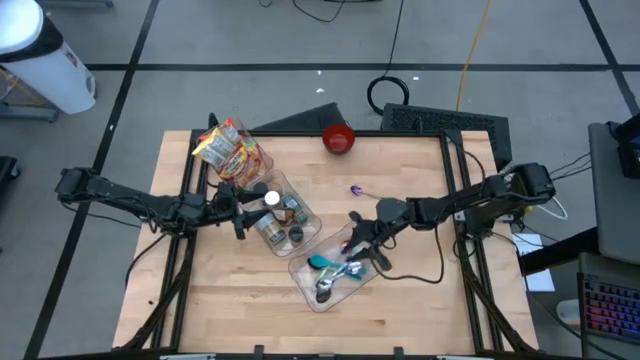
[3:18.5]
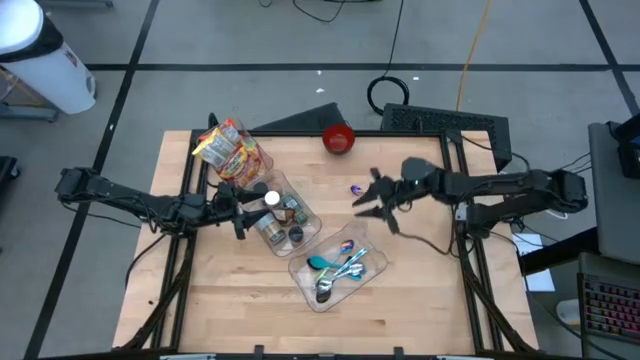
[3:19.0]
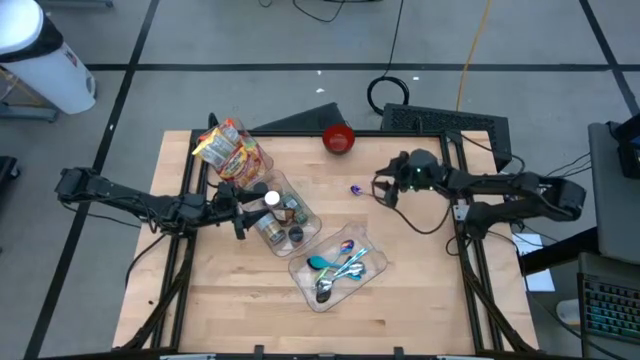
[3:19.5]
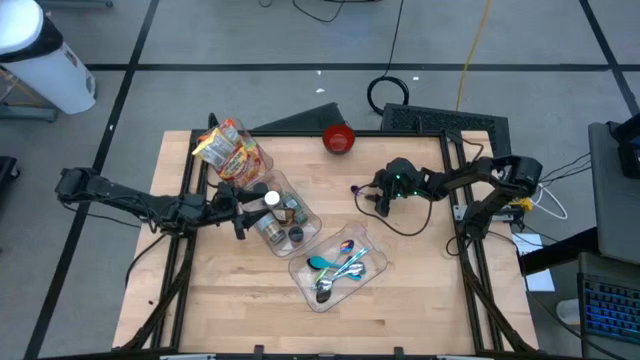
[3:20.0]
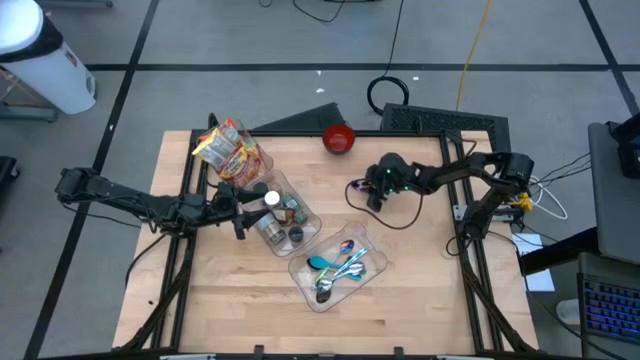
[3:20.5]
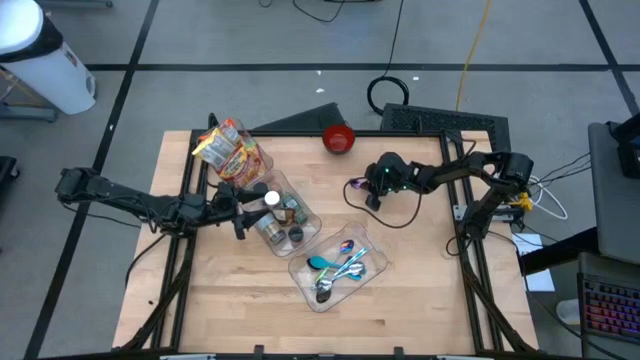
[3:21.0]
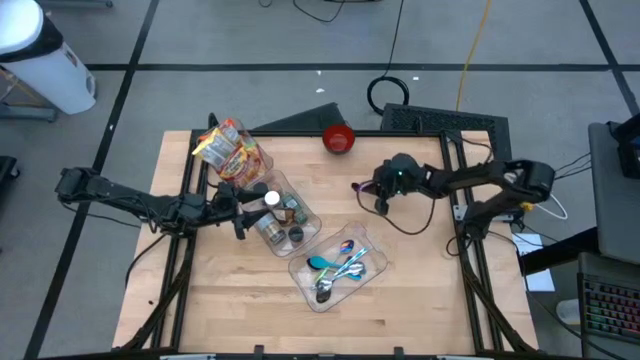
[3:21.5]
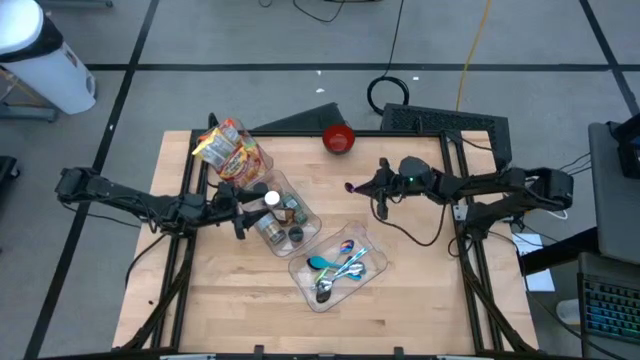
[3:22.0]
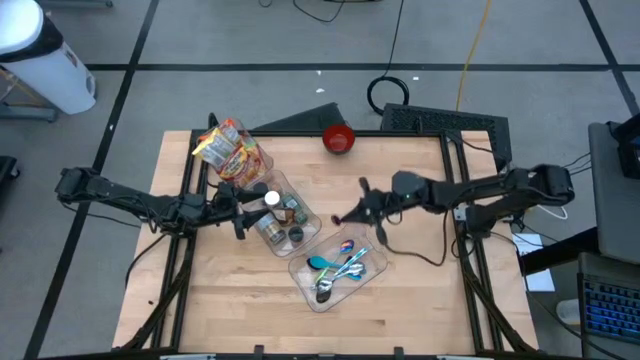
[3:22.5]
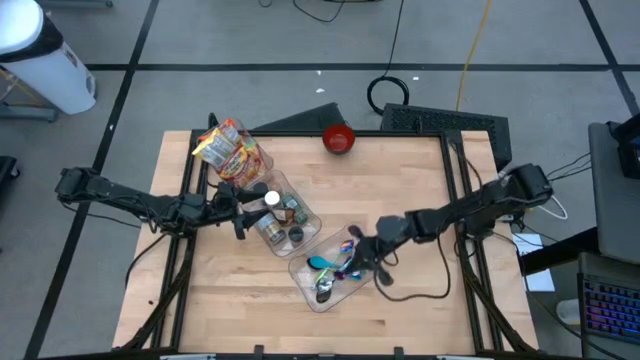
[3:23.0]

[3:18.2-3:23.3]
Task: Pick & Place Food Item
Put the green spoon into the bottom transparent bin

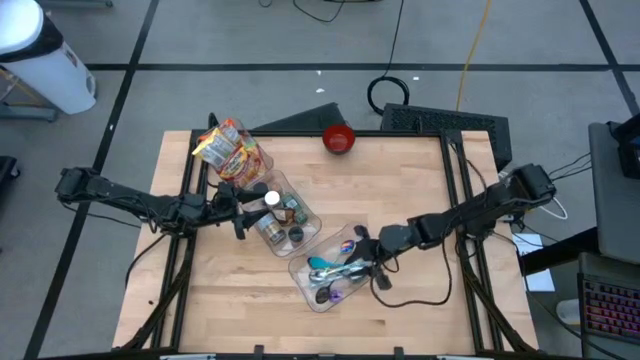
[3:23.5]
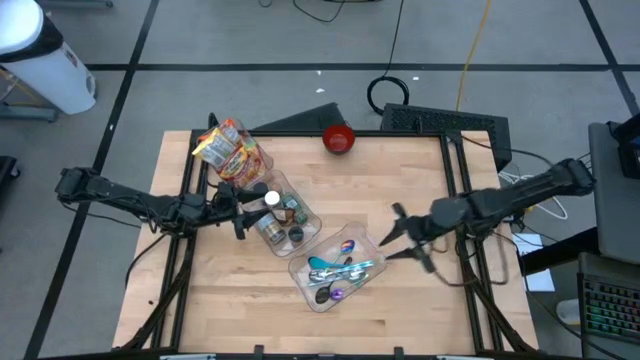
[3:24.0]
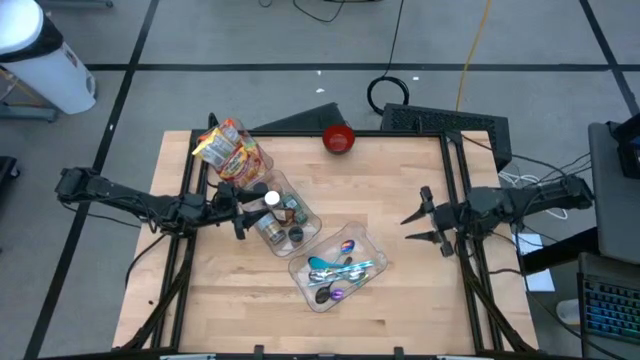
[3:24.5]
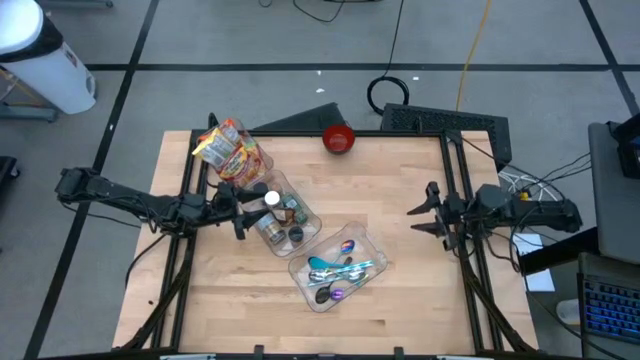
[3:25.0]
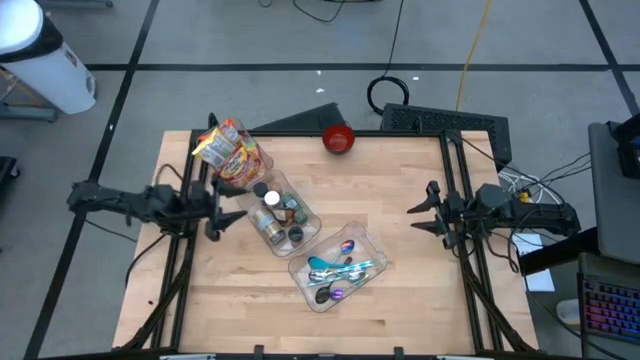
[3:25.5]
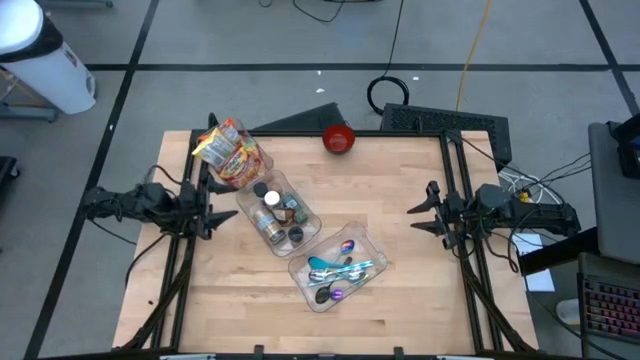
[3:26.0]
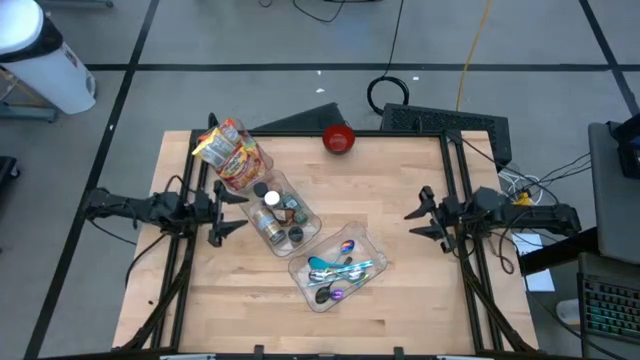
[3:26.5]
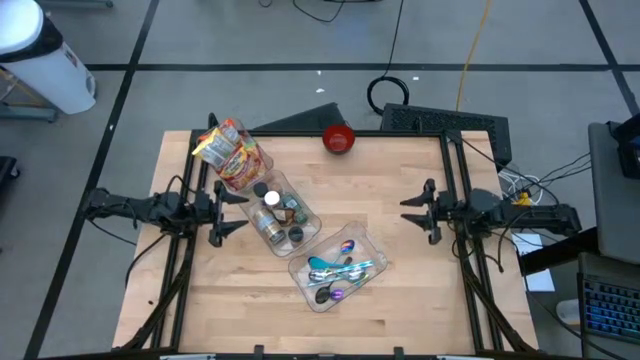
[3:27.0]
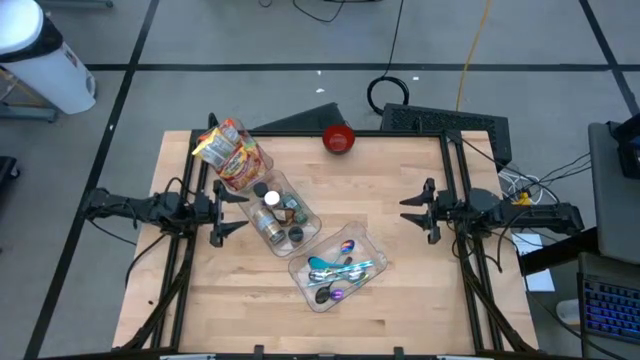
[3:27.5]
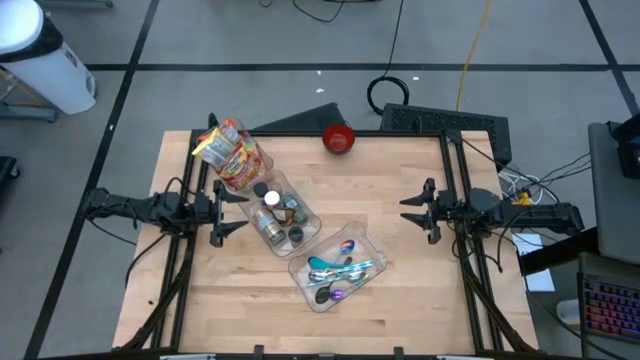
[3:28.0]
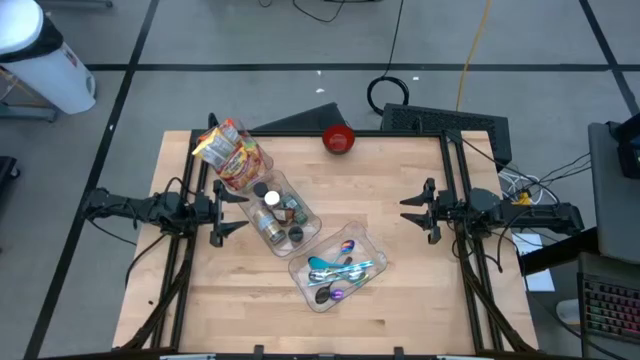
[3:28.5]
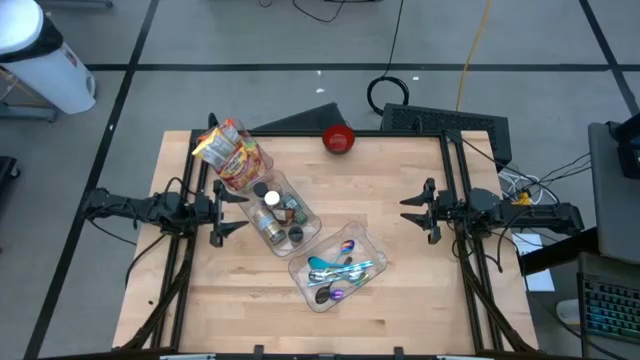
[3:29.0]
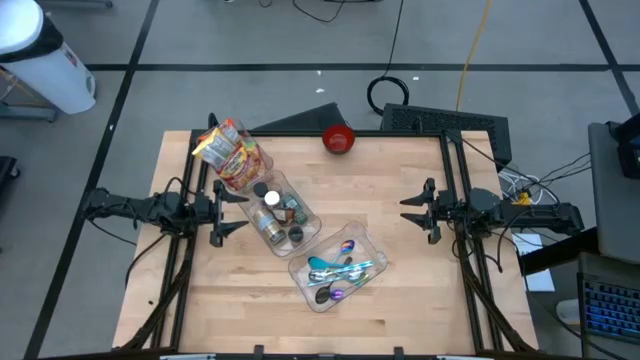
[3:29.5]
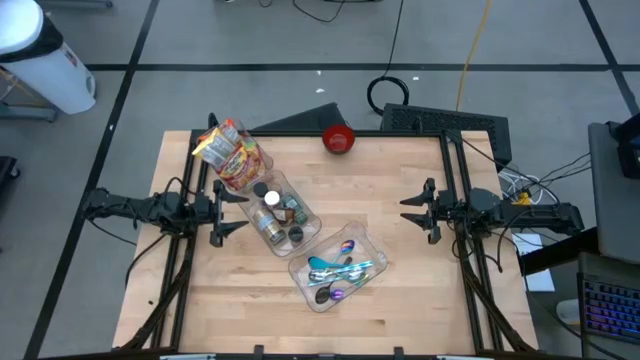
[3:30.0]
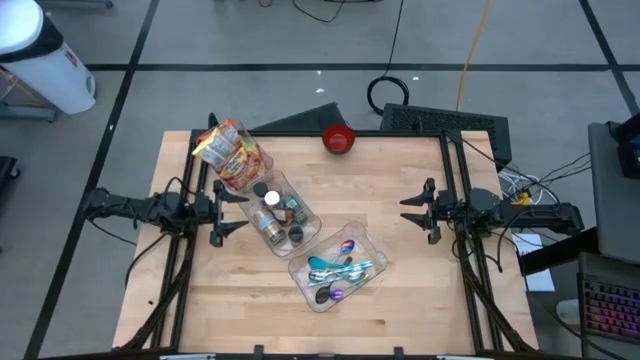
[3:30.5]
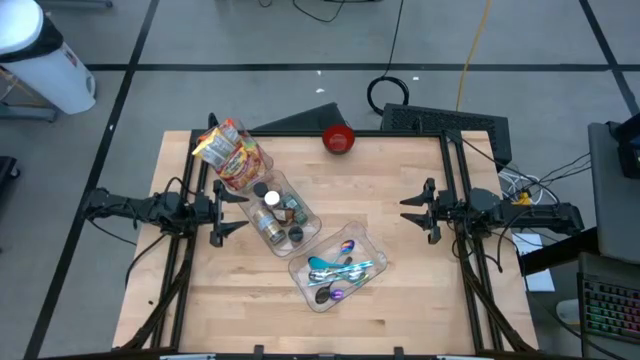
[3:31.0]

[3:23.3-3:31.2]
Return to Home Position

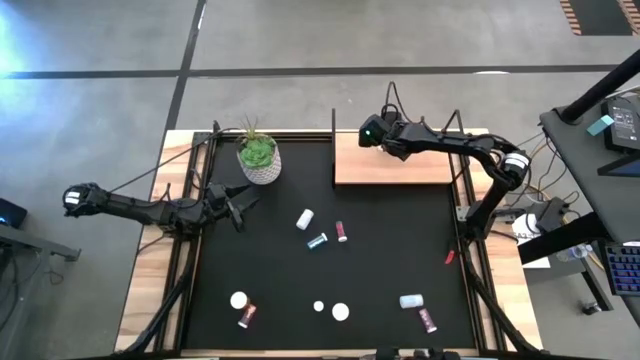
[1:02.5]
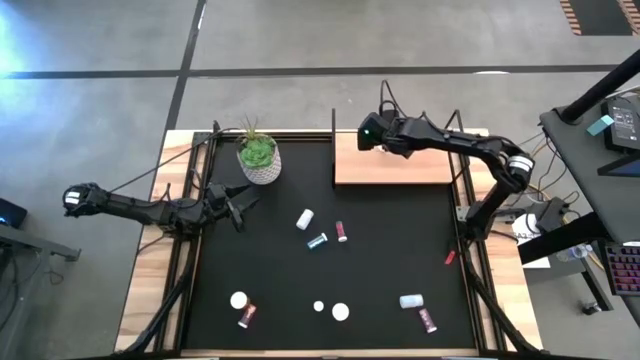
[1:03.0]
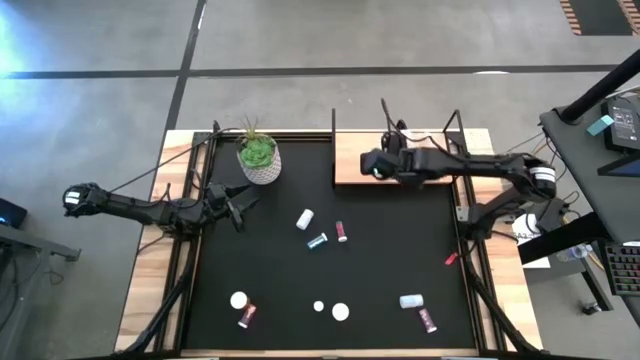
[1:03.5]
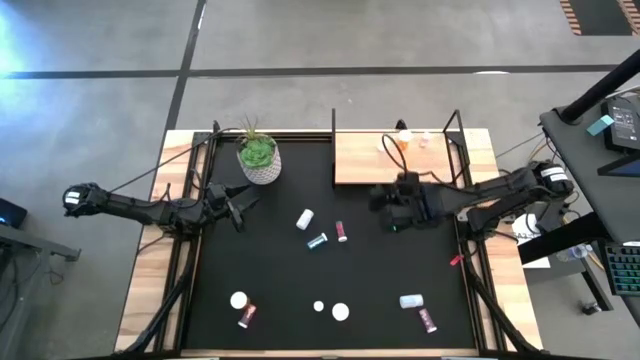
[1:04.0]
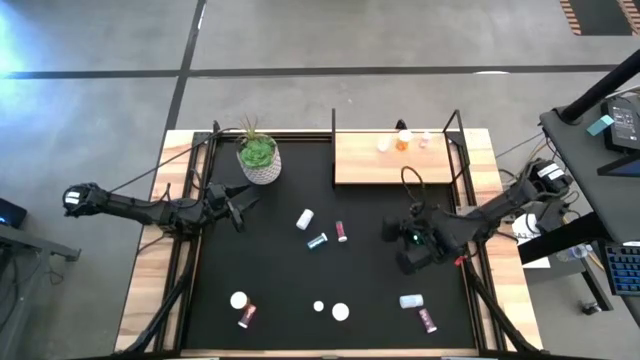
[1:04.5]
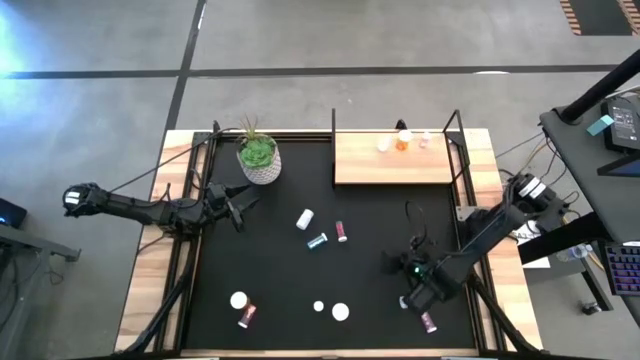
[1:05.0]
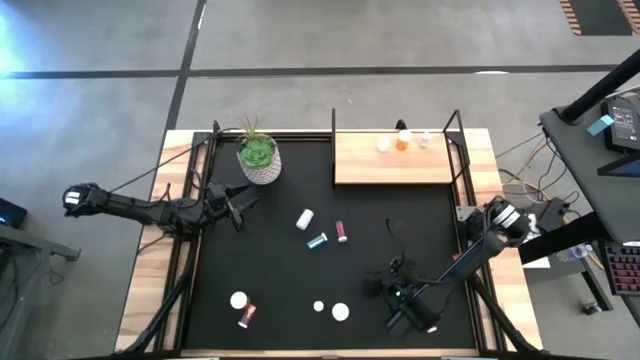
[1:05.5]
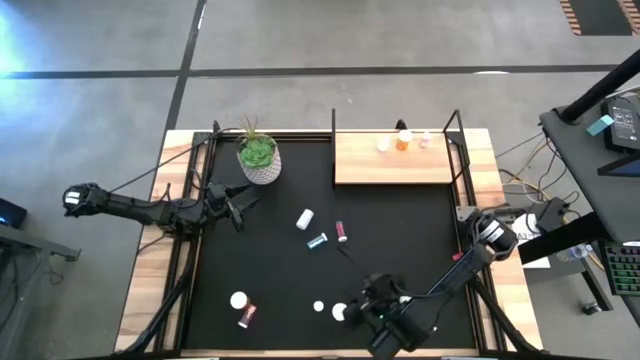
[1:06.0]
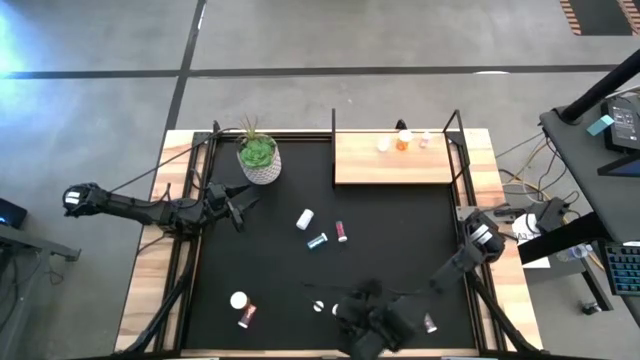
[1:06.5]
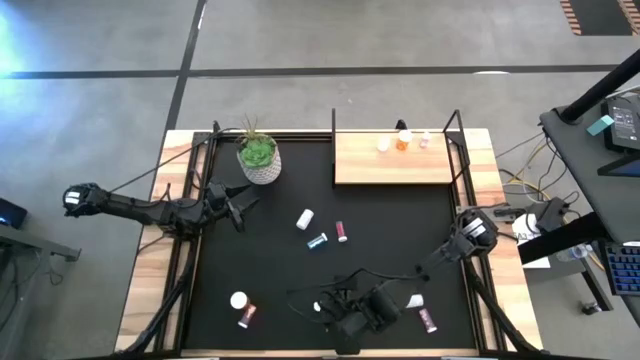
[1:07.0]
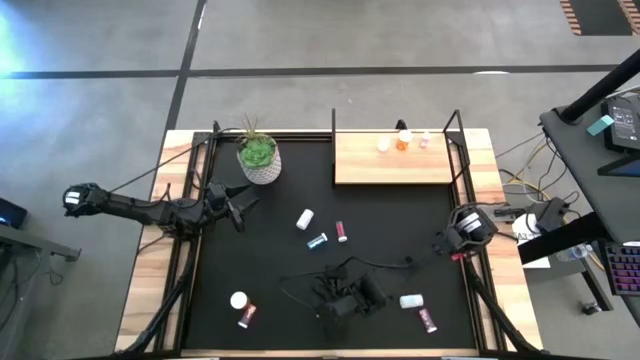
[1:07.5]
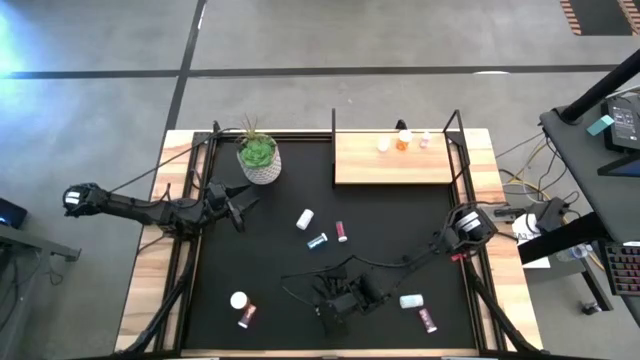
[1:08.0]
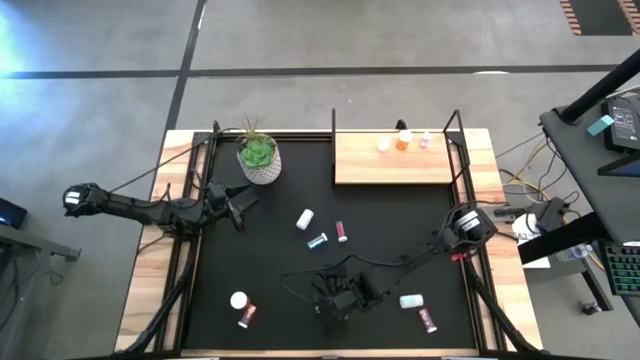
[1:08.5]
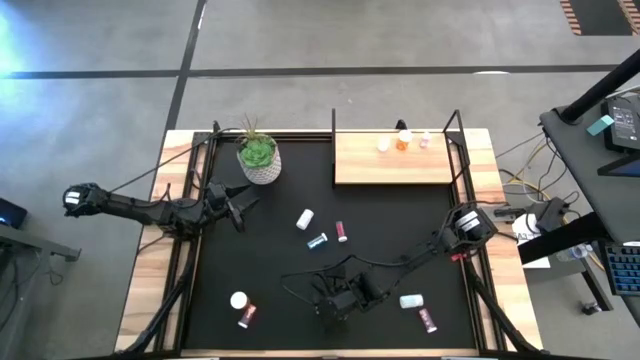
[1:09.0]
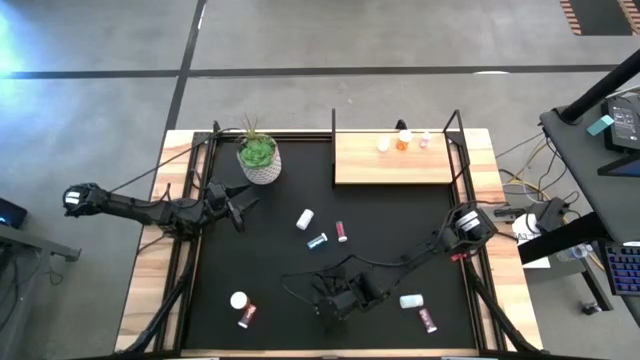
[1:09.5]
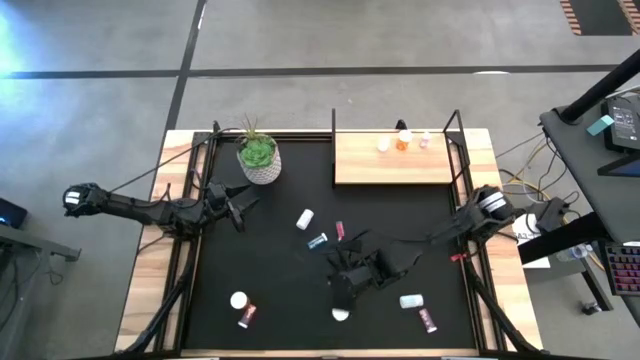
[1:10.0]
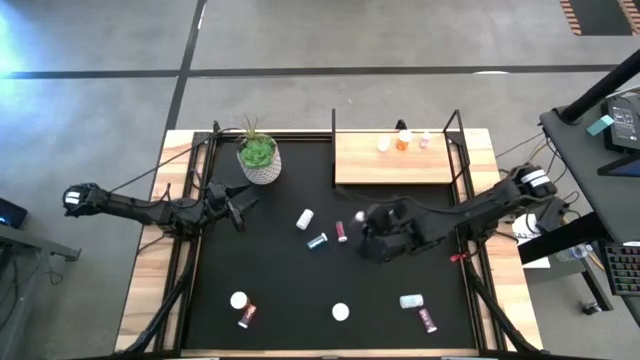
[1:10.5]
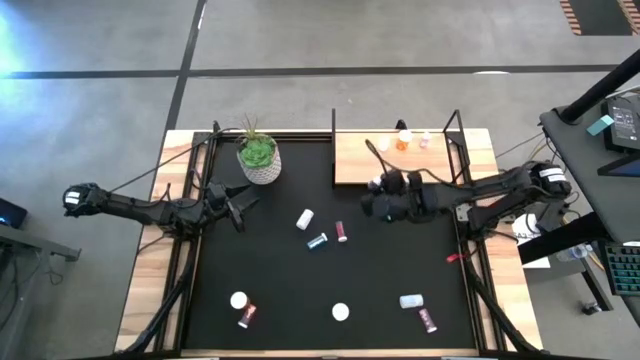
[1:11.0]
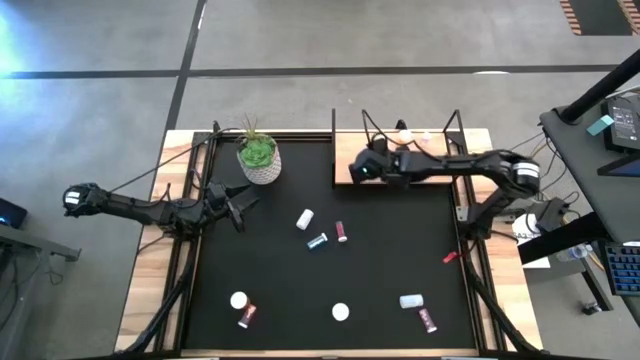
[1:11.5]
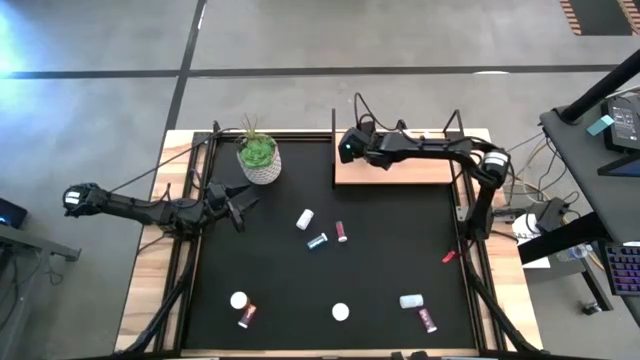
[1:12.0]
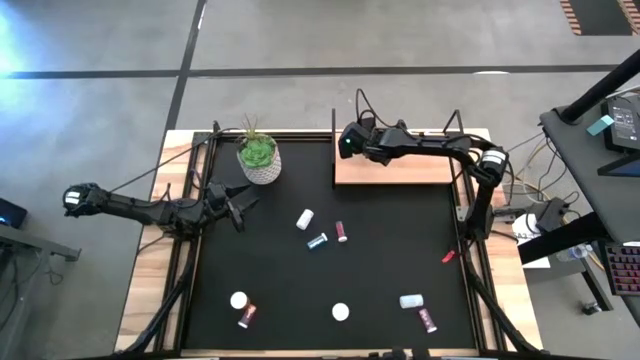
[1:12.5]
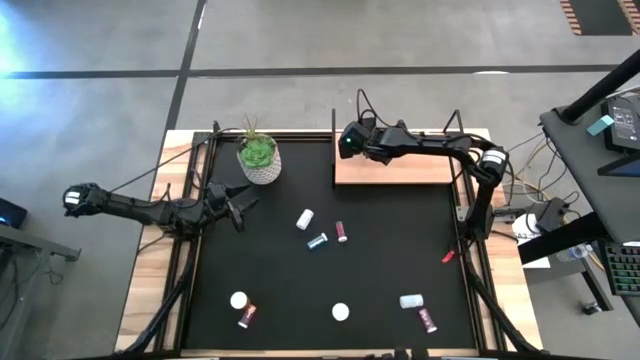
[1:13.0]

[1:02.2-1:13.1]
Task: Pick and place medicine bottles onto shelf by color
Put the bottom blue pill bottle on the shelf
